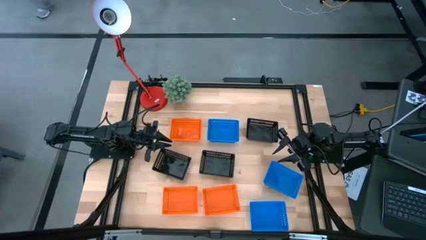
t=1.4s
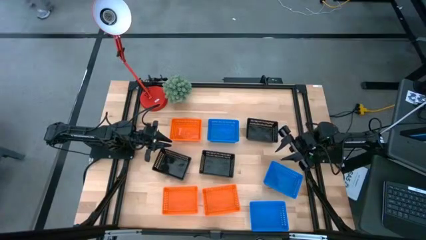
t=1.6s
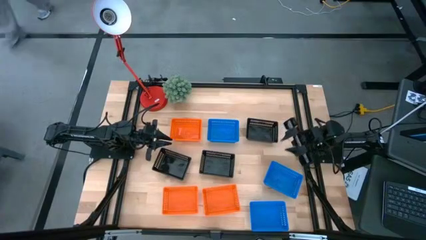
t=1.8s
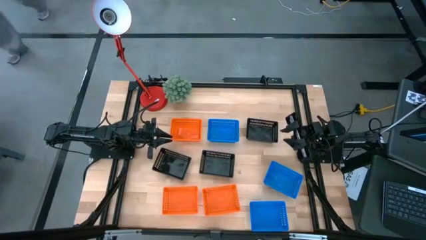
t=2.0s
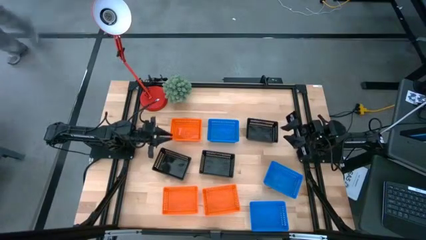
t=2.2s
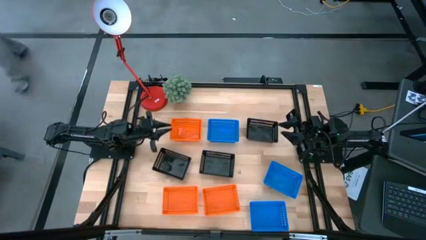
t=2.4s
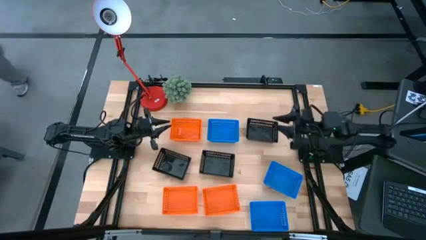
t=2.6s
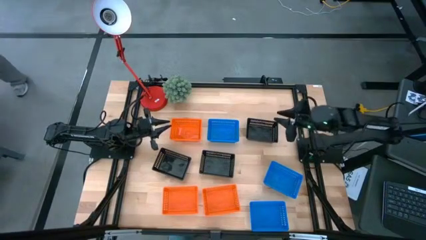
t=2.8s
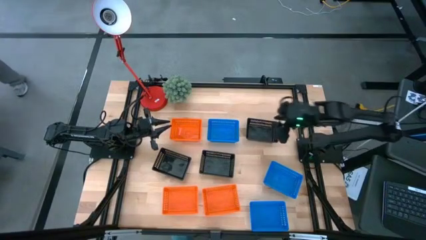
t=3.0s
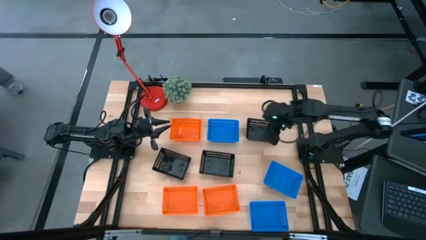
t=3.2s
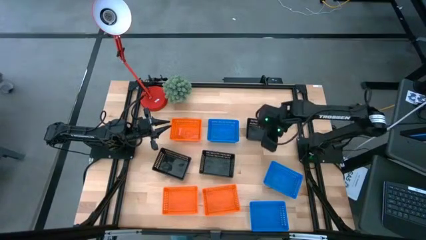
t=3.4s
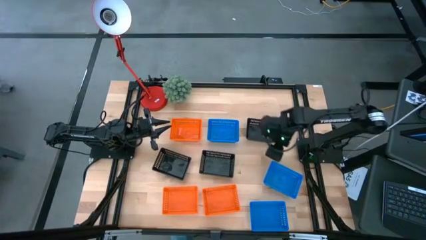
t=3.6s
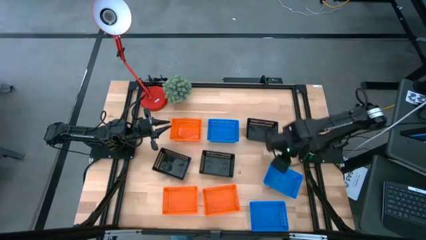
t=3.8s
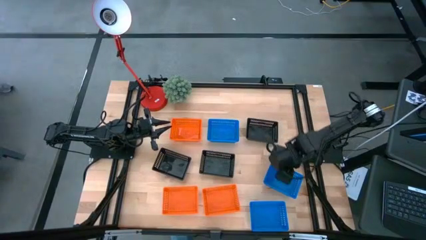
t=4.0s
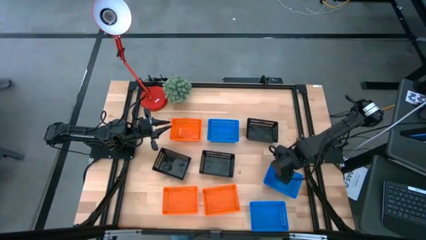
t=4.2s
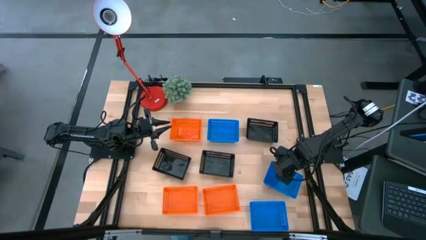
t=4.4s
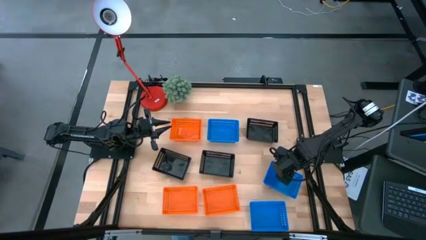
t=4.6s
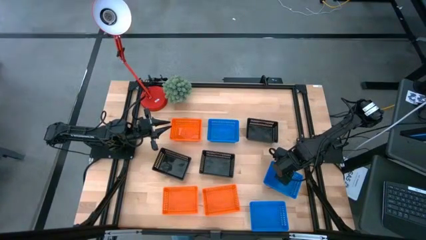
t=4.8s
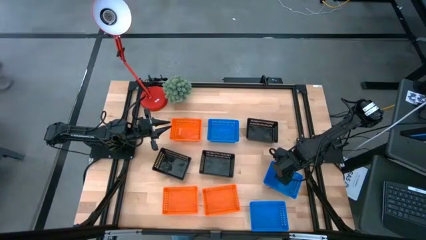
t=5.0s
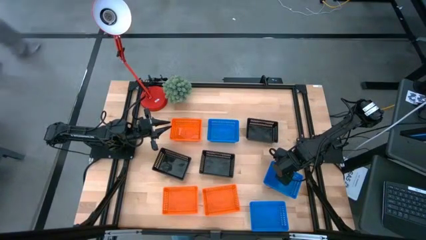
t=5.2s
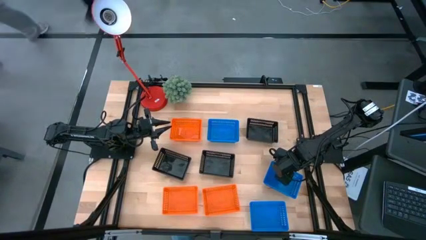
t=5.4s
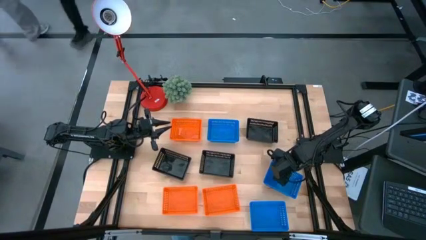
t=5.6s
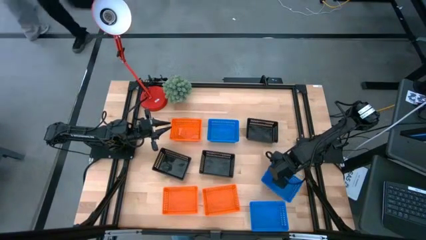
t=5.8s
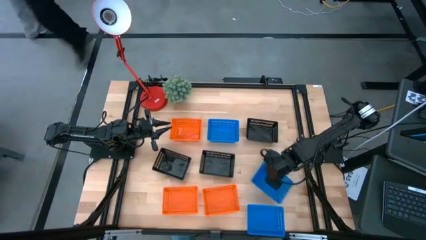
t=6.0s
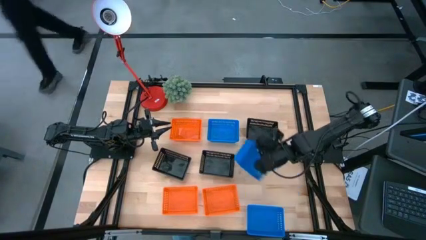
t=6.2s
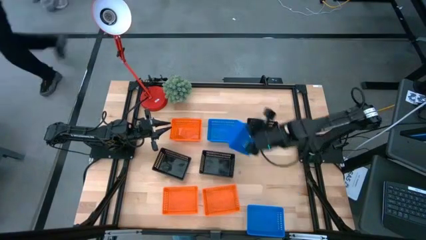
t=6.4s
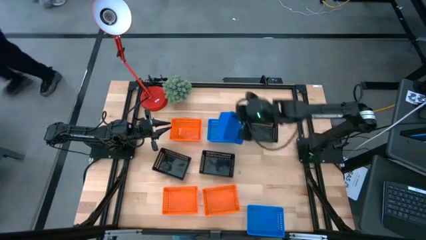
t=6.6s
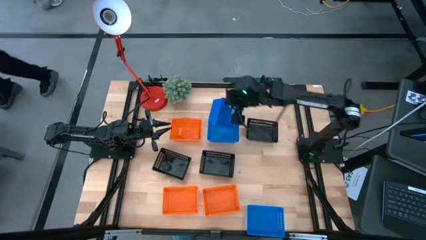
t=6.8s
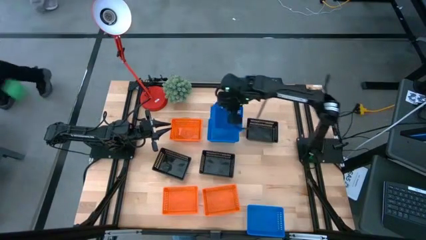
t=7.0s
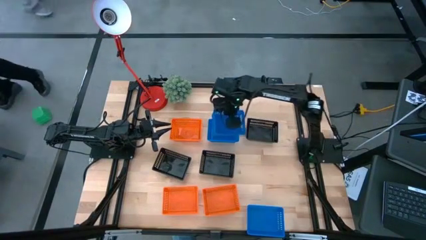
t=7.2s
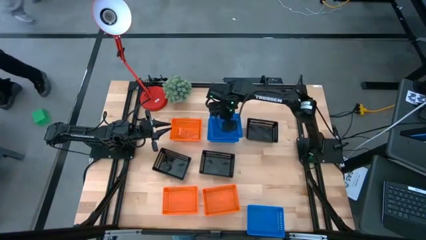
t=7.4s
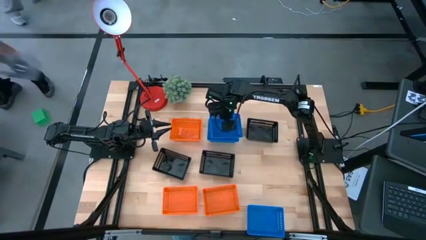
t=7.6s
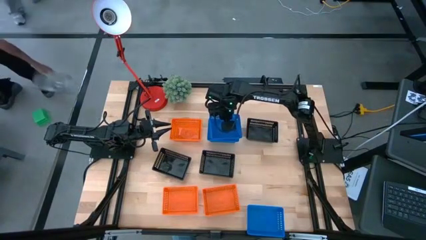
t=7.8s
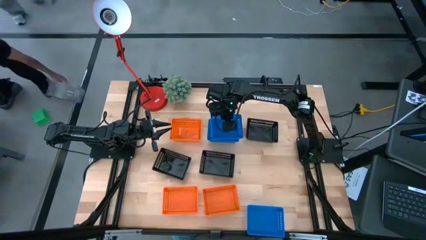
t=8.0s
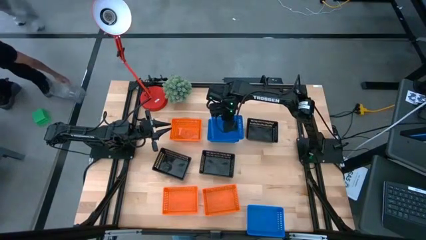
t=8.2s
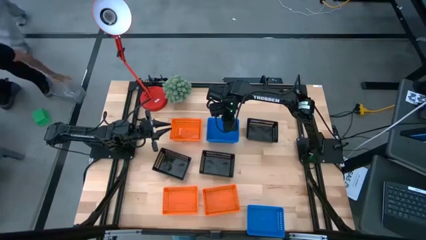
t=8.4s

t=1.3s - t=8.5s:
Stack the middle right blue bin on the top blue bin

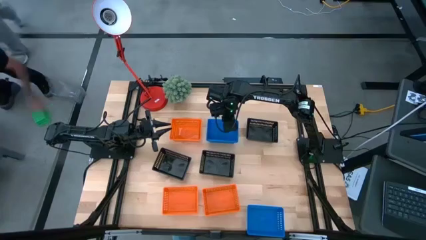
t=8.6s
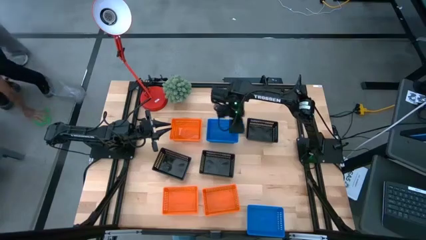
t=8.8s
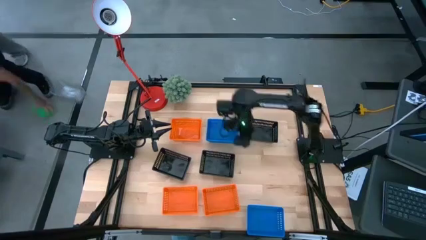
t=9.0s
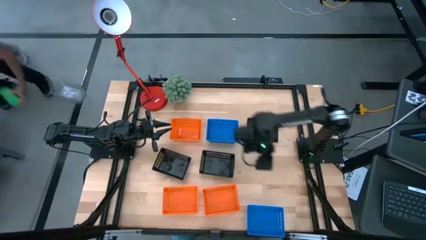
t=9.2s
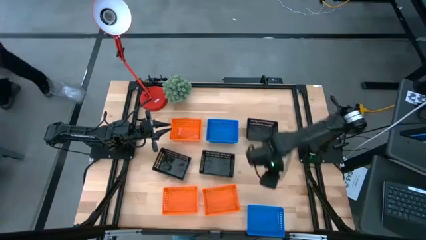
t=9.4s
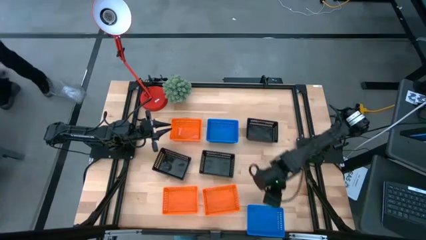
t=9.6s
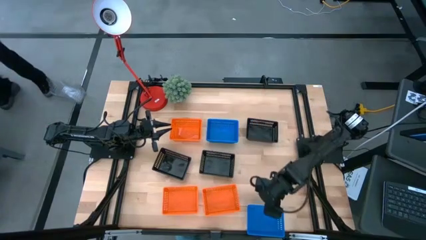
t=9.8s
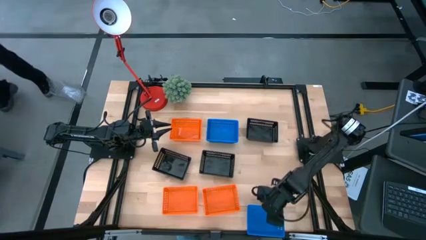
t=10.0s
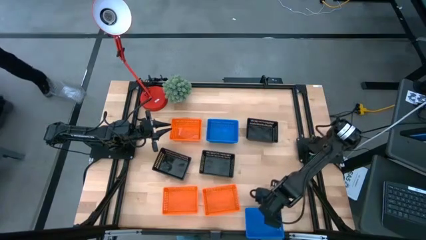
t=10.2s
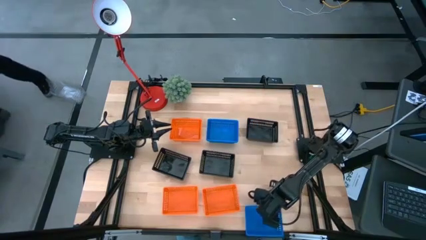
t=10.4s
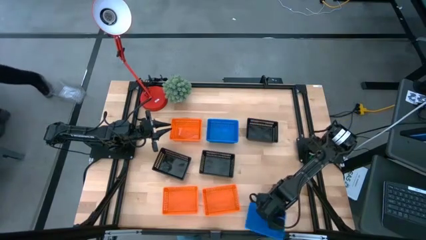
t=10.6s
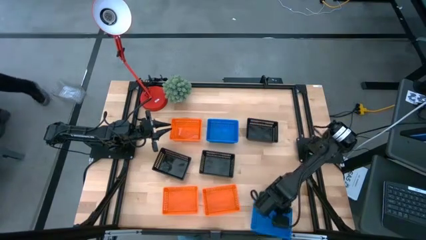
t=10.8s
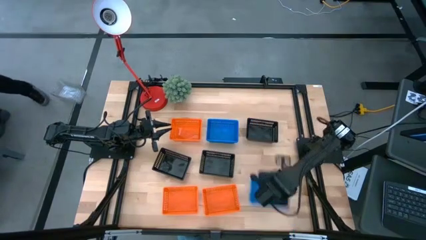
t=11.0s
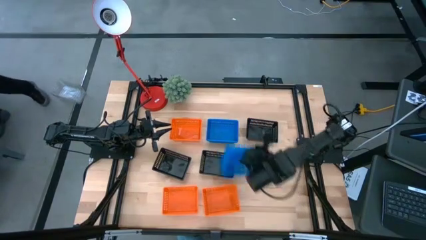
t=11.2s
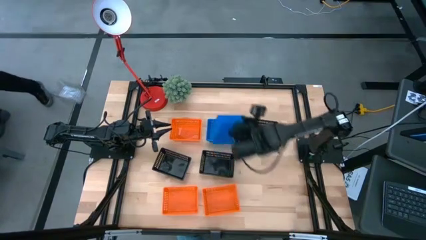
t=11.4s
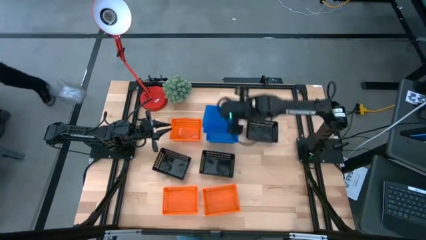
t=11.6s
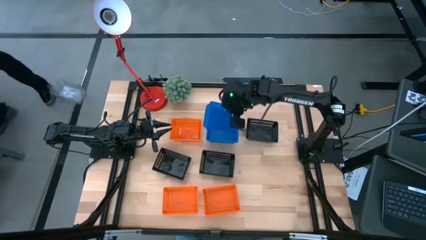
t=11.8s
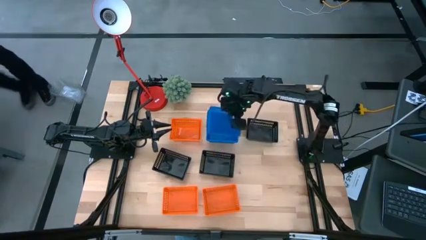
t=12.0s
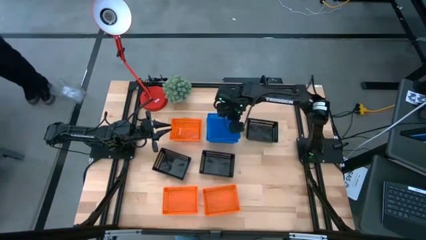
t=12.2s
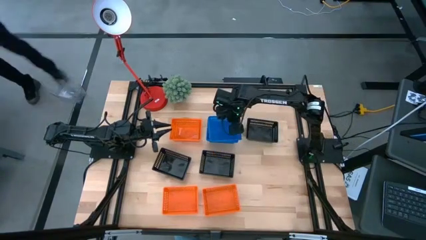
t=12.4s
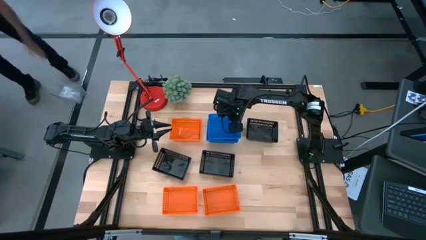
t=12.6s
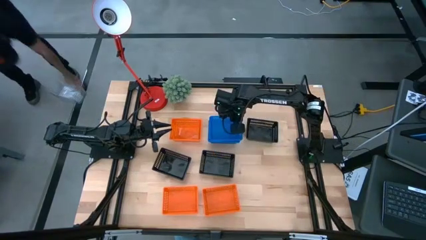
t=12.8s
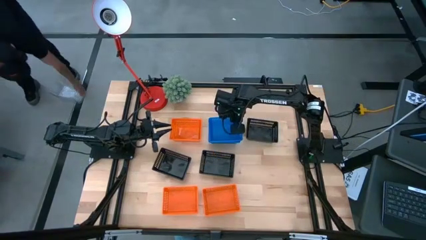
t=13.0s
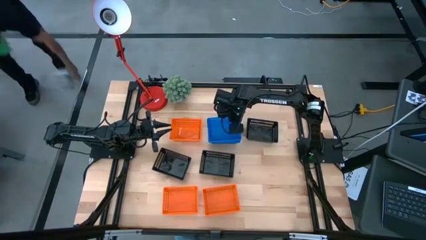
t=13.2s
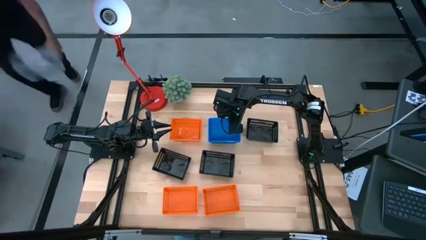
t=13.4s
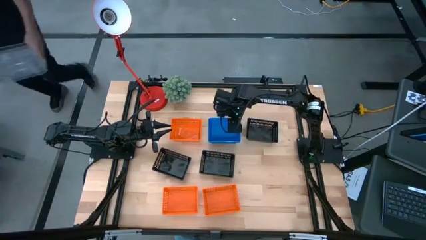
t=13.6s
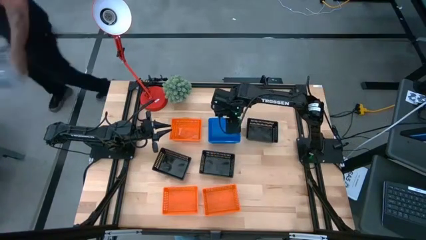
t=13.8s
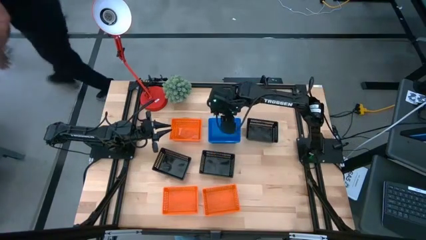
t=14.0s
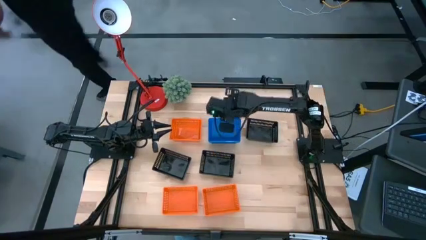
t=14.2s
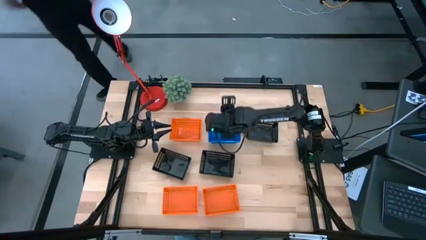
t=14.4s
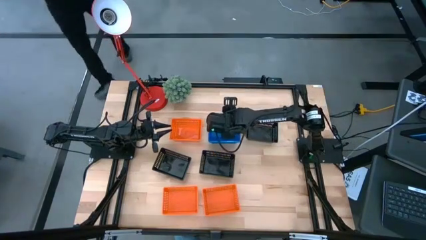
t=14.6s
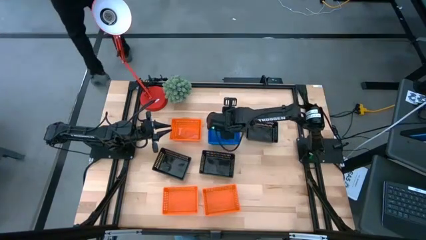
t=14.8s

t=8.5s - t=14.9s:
Stack the bottom blue bin on the top blue bin

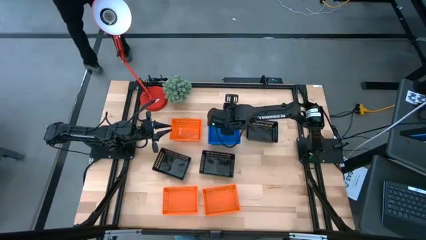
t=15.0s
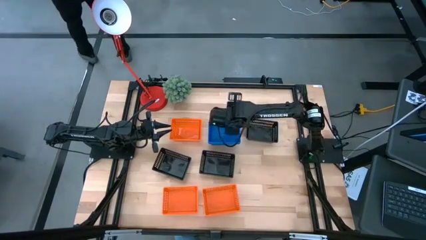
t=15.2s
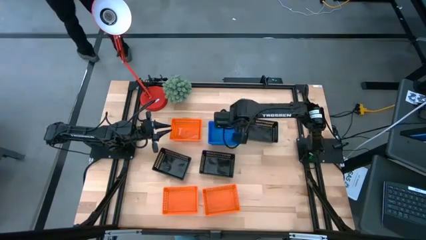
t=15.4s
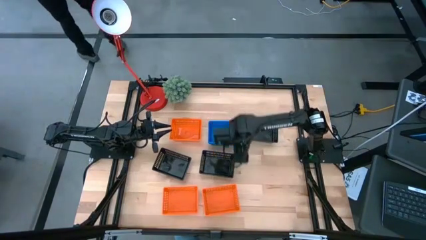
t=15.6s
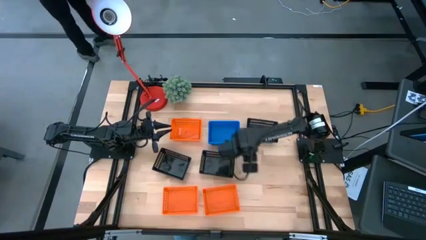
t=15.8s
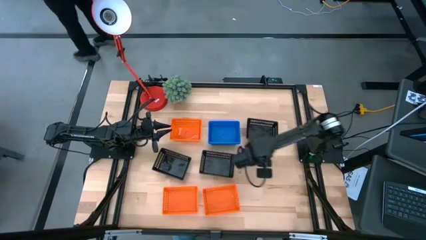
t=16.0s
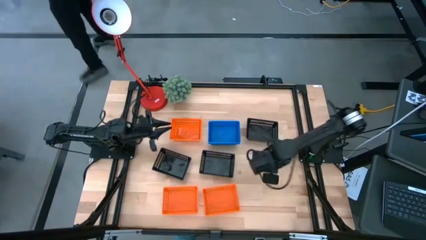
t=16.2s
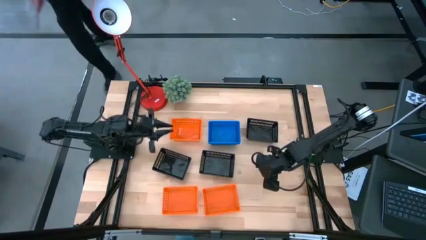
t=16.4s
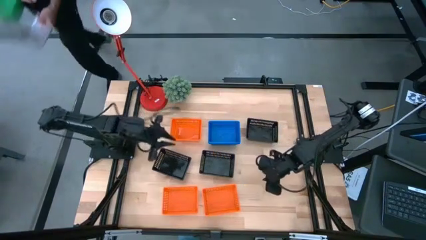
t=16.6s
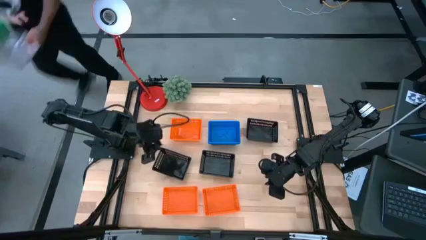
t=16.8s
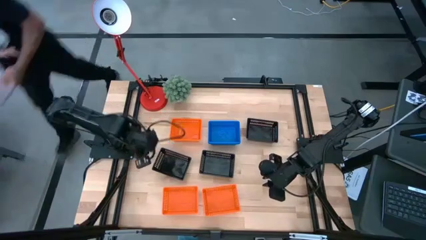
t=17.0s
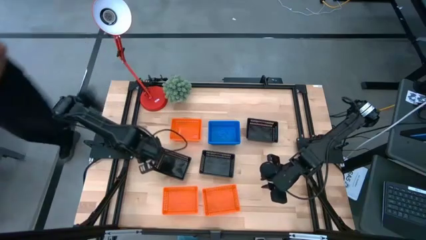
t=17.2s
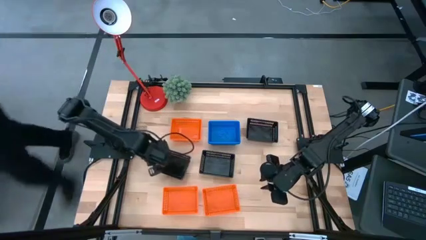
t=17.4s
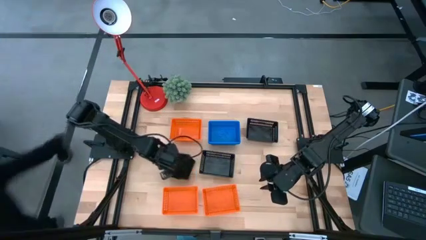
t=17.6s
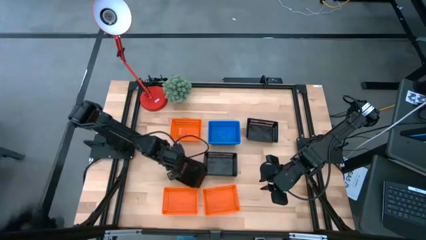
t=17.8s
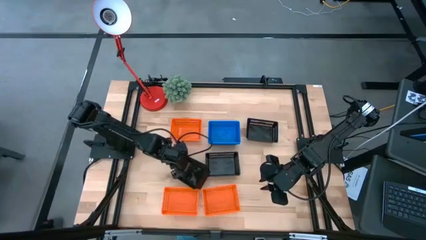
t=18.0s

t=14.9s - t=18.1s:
Move the left black bin to the center of the table
